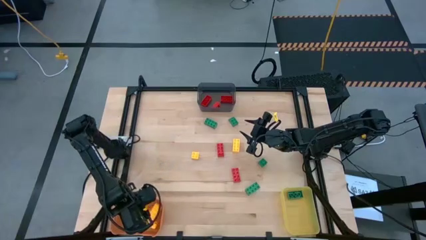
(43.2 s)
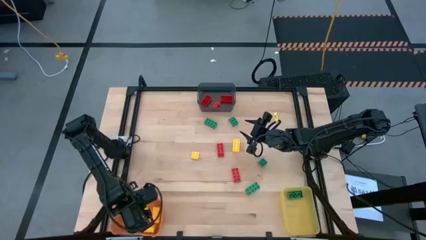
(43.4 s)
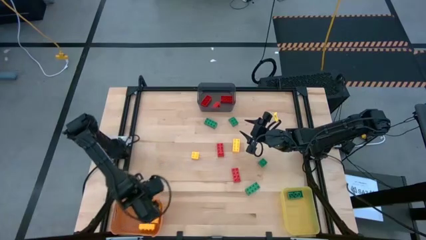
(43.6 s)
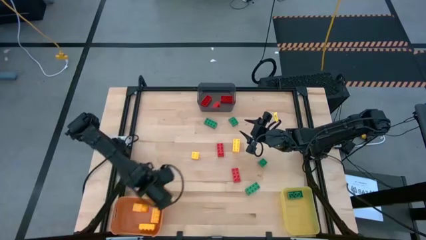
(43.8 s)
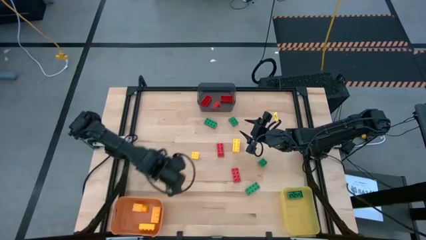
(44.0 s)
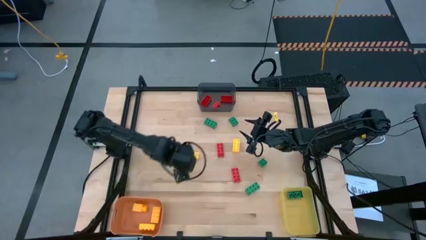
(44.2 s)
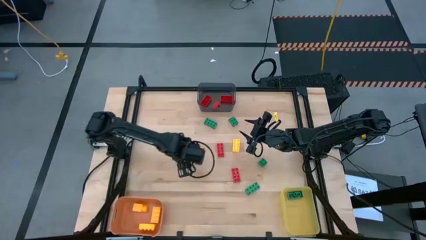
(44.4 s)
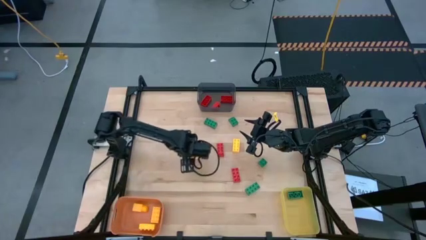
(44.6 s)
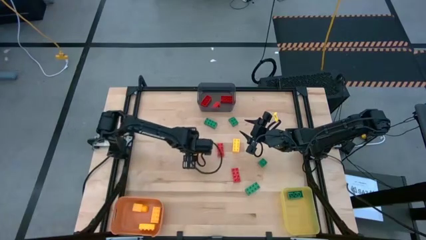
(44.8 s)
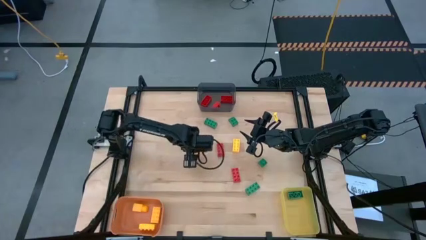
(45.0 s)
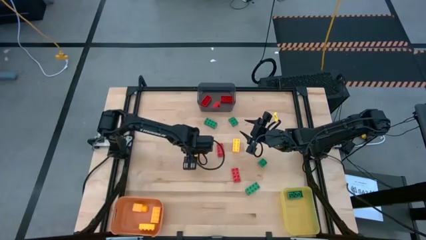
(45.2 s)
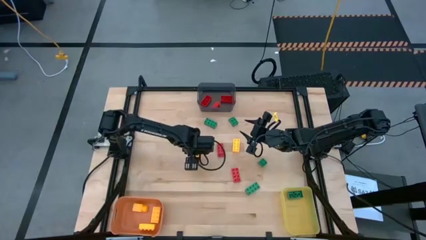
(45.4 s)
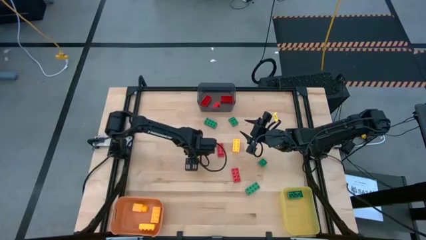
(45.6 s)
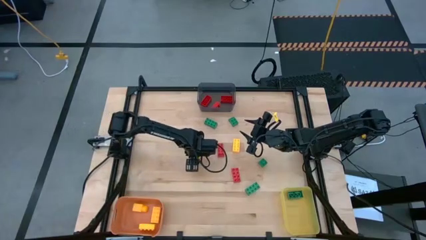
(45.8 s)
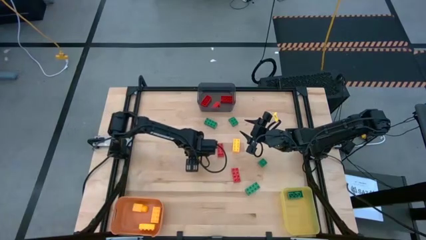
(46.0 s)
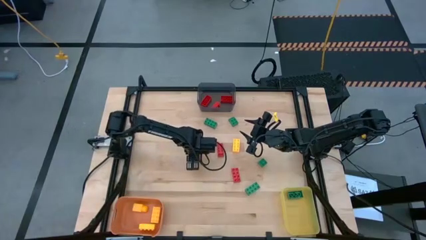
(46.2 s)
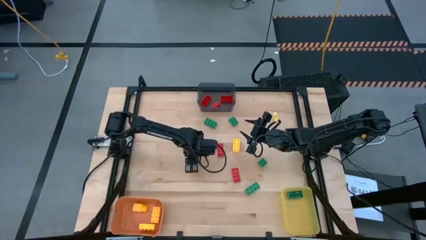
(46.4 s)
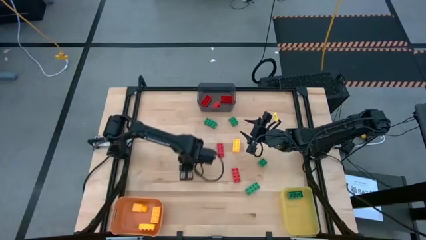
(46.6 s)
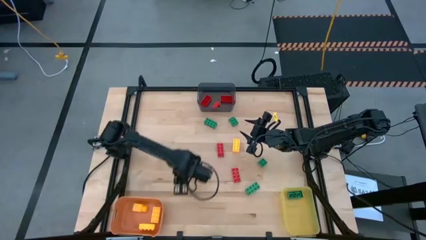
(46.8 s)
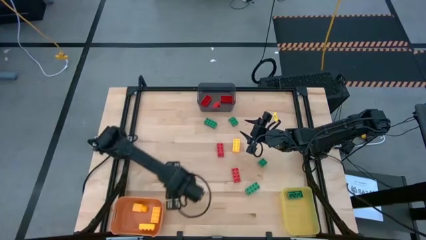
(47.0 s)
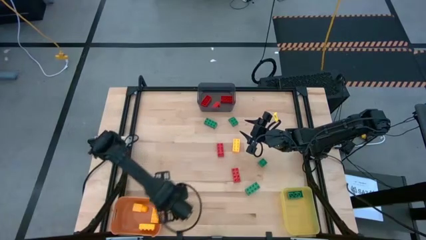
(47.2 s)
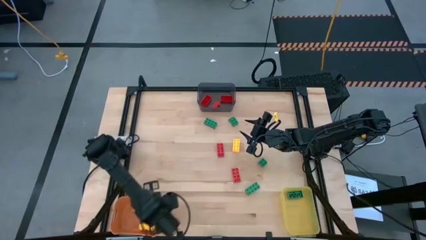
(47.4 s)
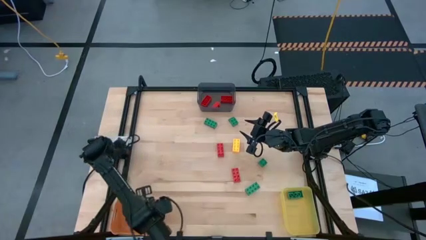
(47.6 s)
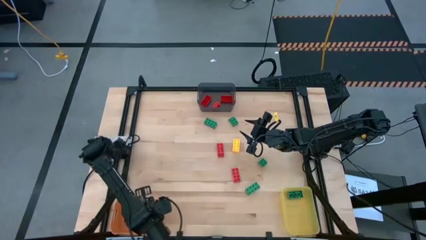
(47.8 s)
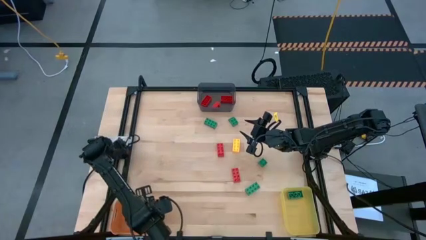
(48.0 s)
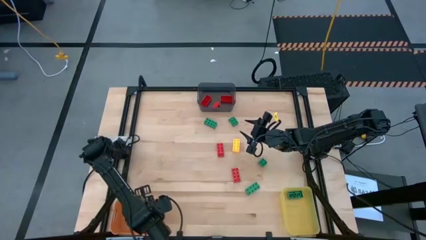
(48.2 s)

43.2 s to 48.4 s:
Task: Sort & place blocks by color
Put the yellow game piece into the orange bin

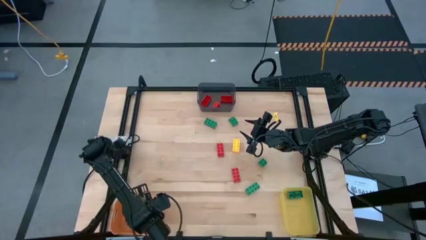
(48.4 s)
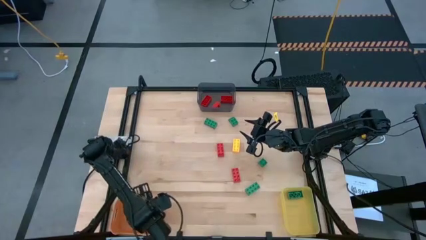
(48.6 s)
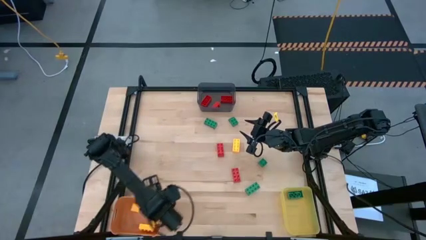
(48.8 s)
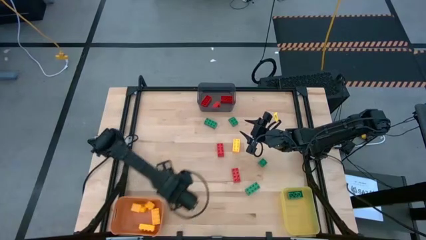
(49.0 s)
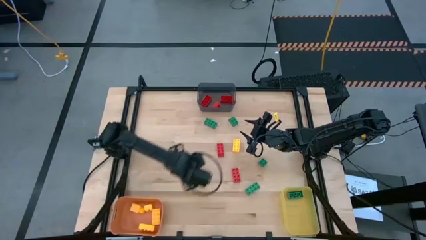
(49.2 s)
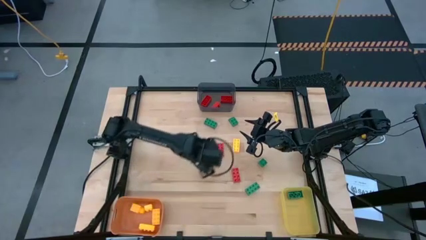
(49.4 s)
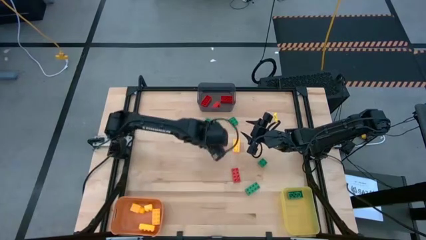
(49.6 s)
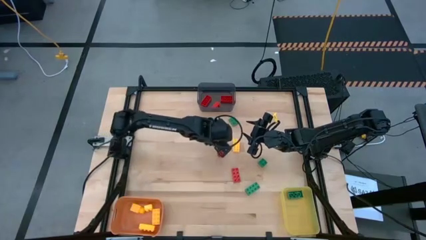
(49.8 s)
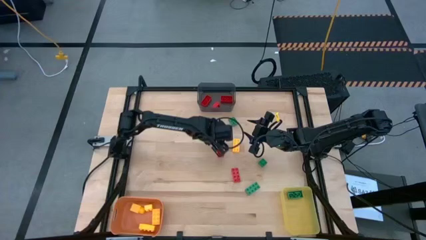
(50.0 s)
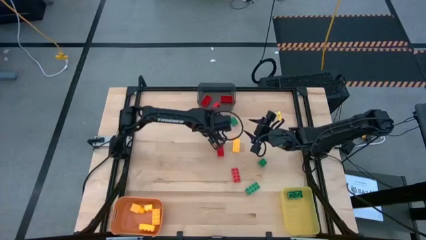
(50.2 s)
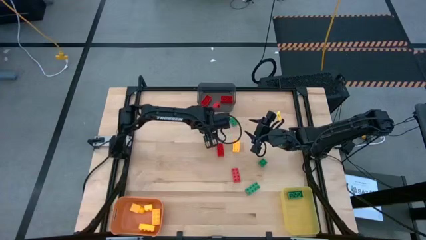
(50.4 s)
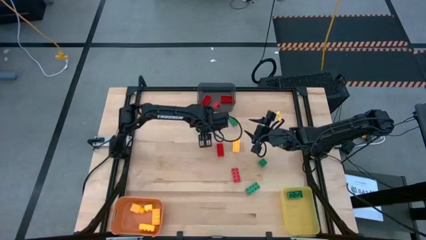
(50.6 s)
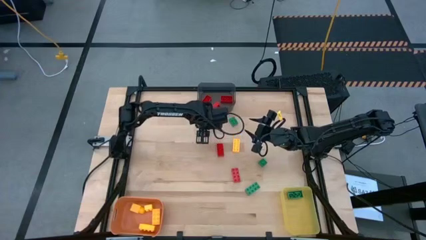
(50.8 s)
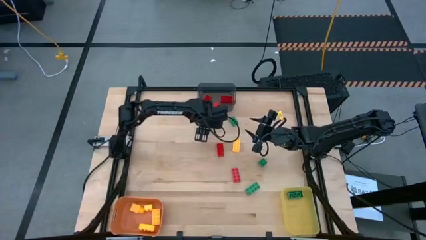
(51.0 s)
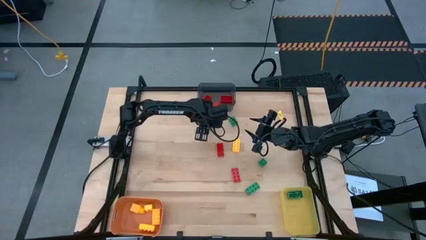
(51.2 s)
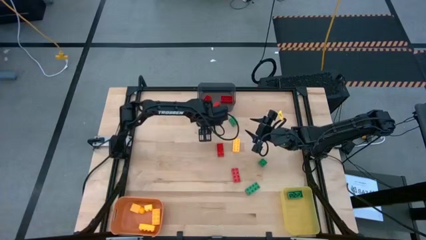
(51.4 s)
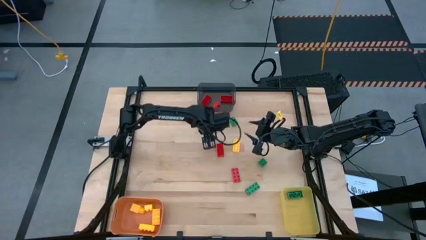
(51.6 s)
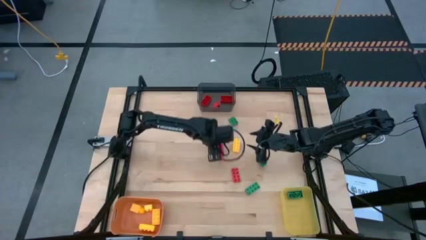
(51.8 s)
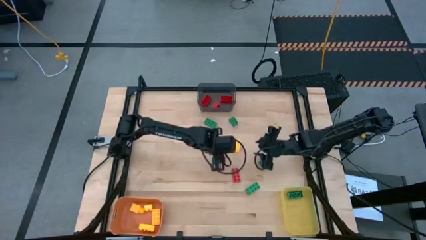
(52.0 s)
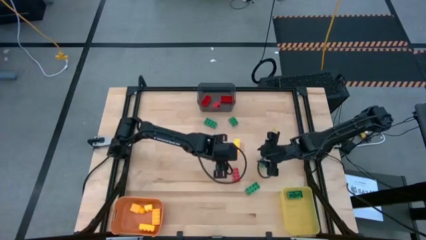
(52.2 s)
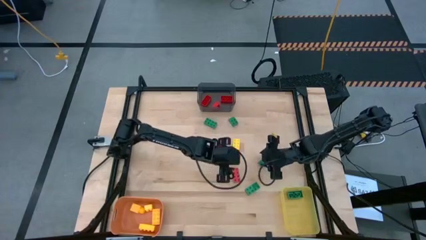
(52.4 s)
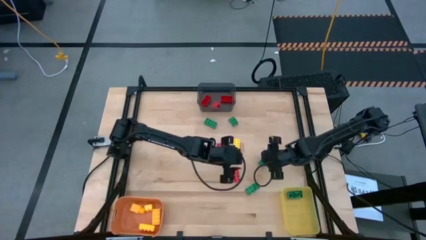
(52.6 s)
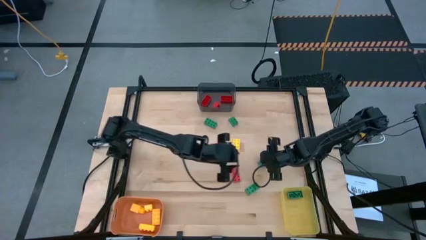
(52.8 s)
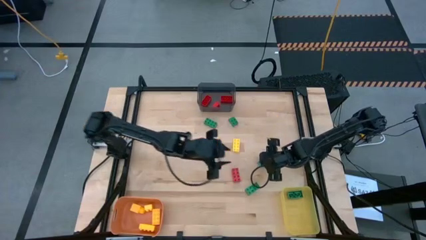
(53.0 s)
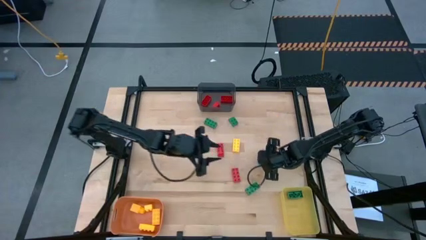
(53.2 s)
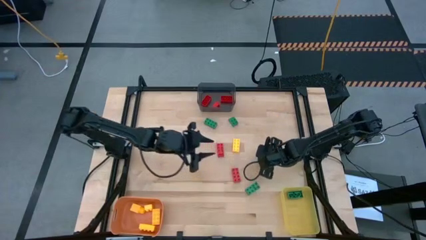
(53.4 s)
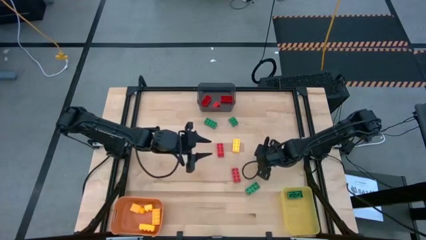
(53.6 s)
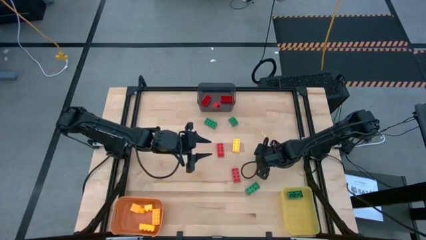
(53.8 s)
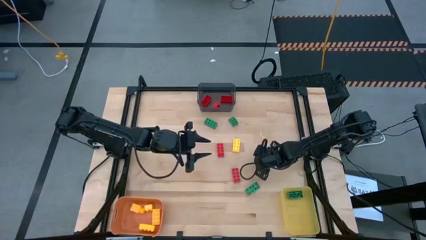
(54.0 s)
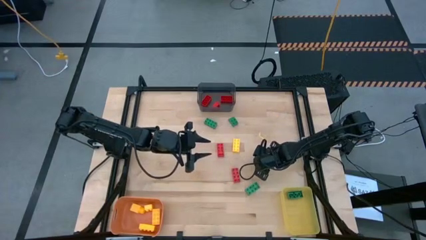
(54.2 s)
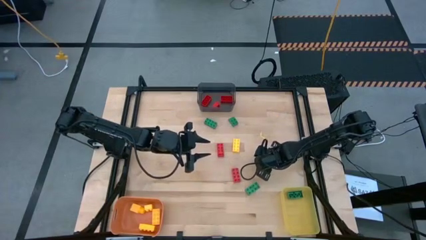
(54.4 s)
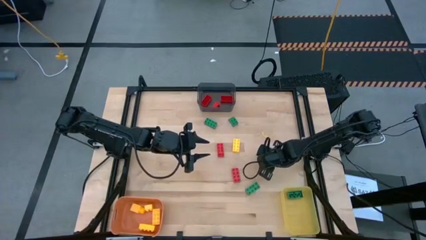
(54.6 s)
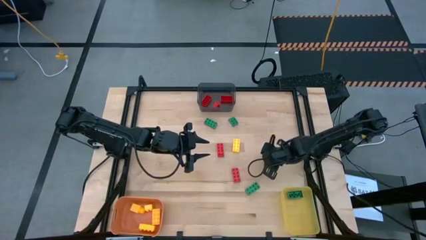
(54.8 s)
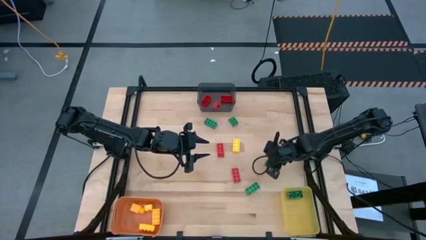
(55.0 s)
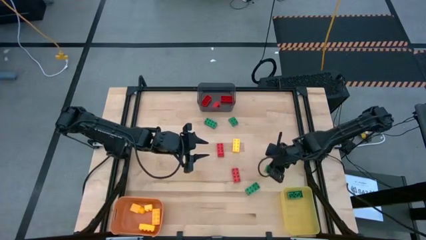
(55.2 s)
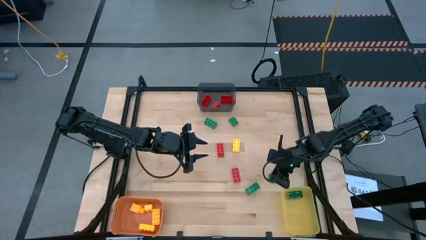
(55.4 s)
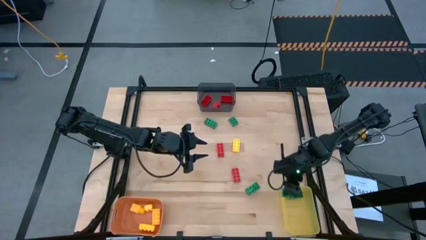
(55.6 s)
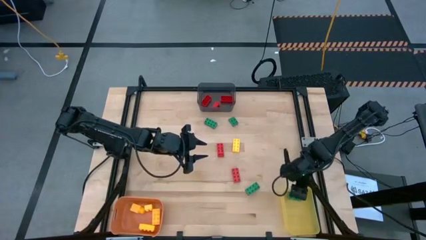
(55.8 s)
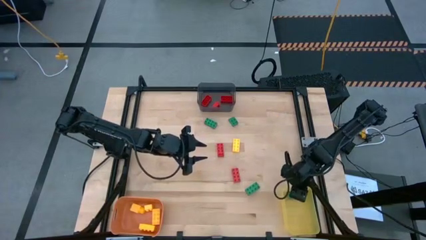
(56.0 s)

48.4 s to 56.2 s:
Put the green game piece into the yellow bin

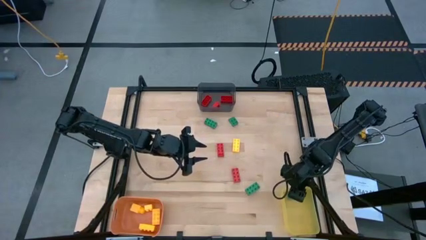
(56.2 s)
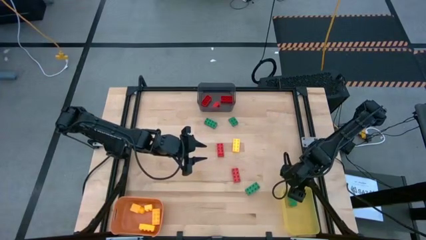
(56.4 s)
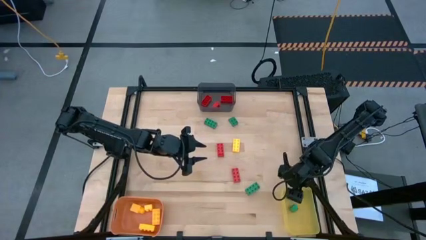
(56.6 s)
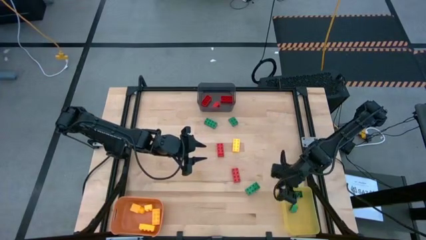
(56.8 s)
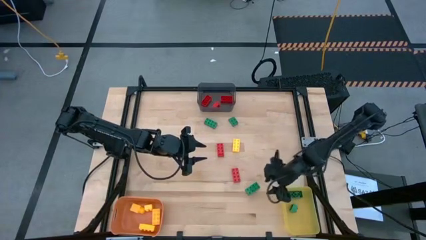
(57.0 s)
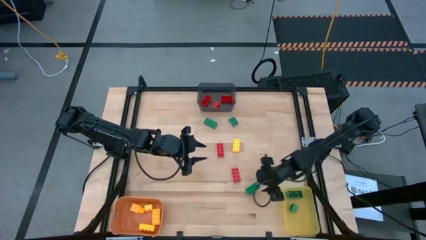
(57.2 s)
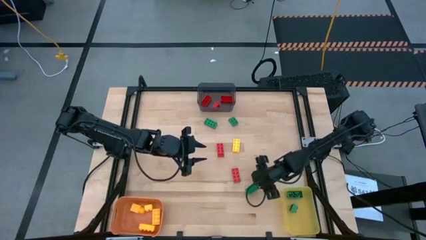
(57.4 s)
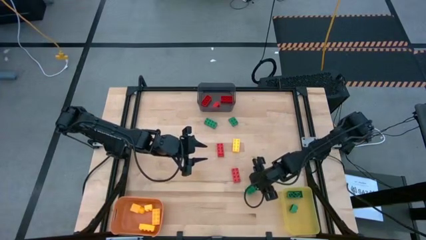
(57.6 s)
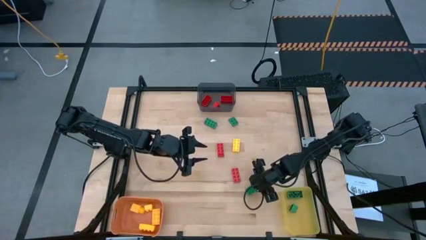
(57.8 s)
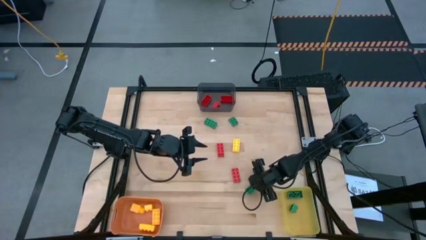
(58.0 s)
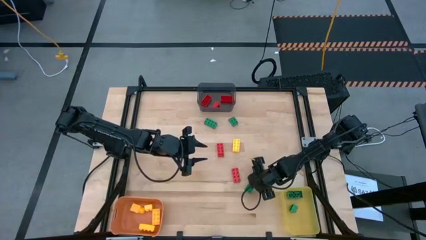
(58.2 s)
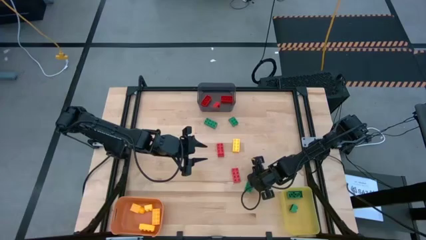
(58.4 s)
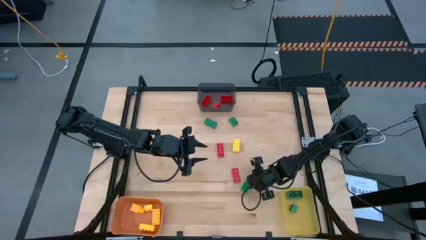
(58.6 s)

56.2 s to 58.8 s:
Put the green game piece into the yellow bin
